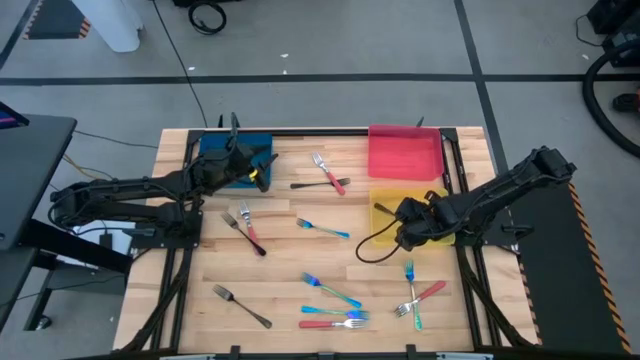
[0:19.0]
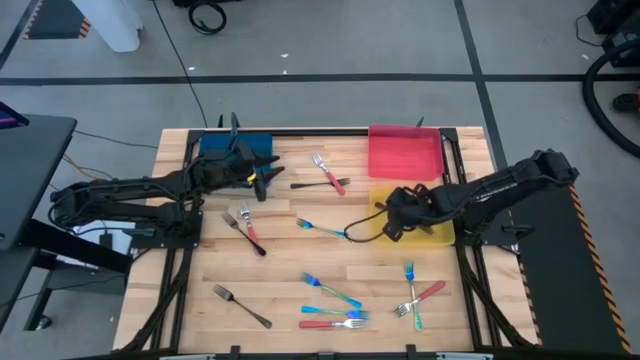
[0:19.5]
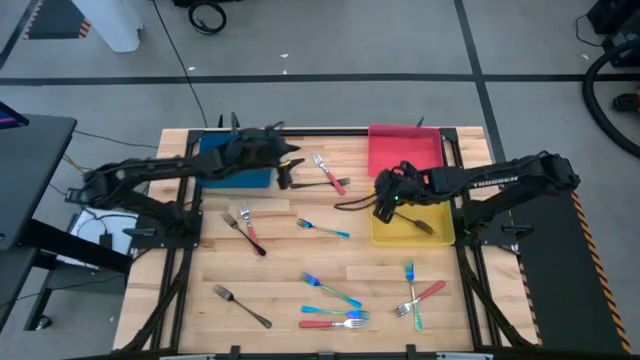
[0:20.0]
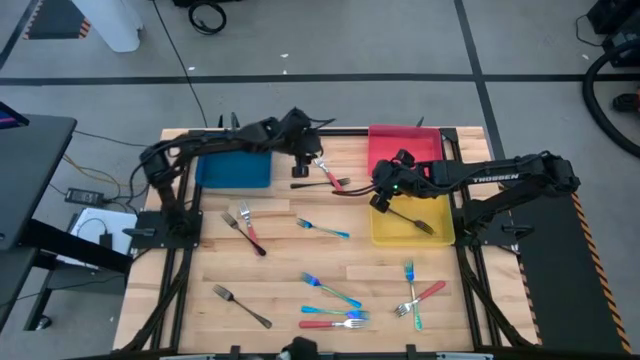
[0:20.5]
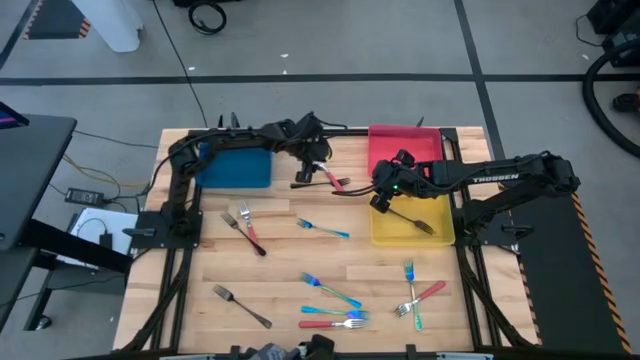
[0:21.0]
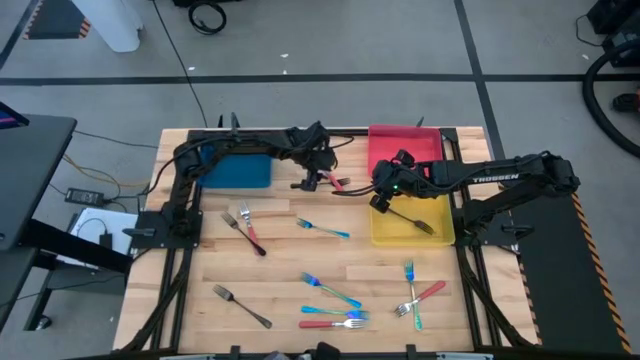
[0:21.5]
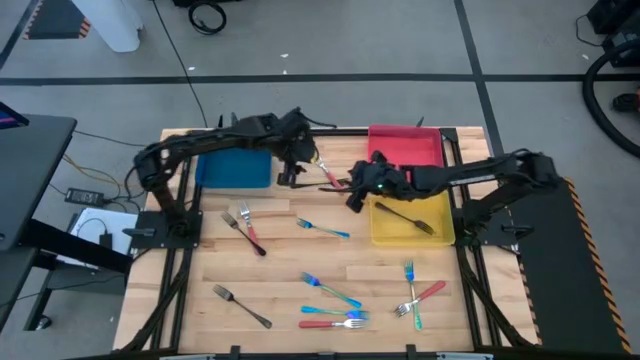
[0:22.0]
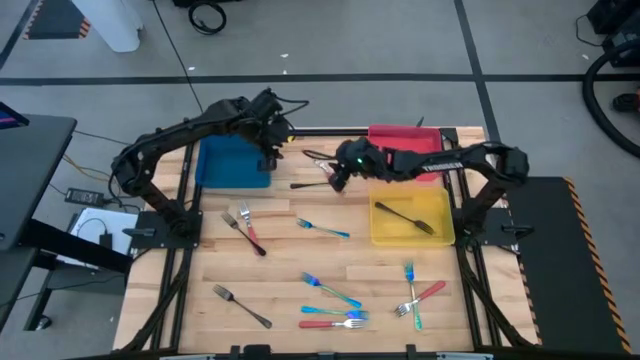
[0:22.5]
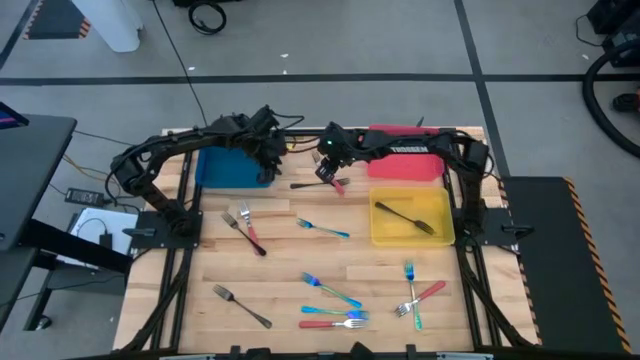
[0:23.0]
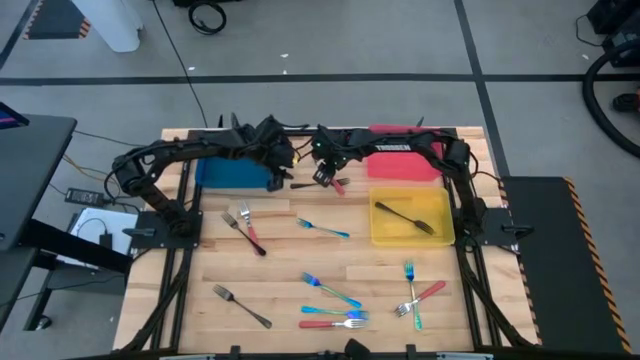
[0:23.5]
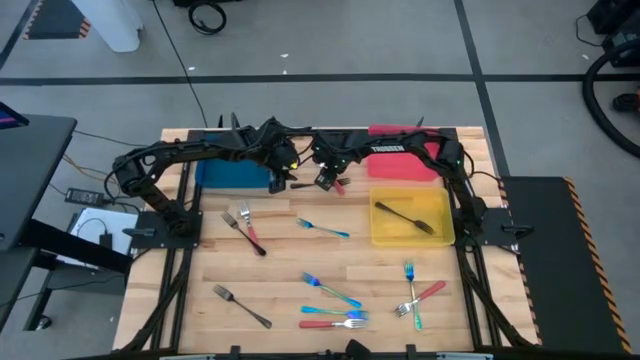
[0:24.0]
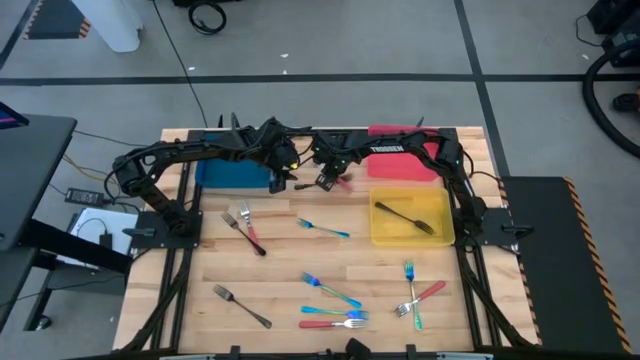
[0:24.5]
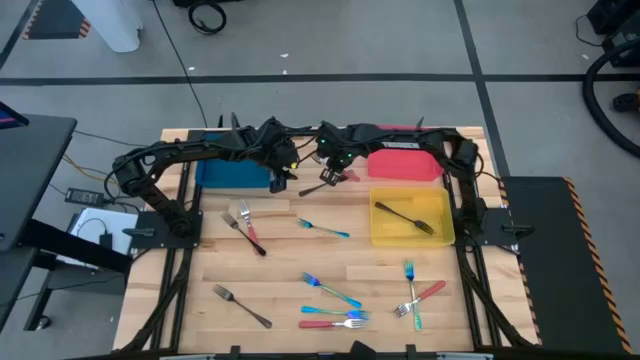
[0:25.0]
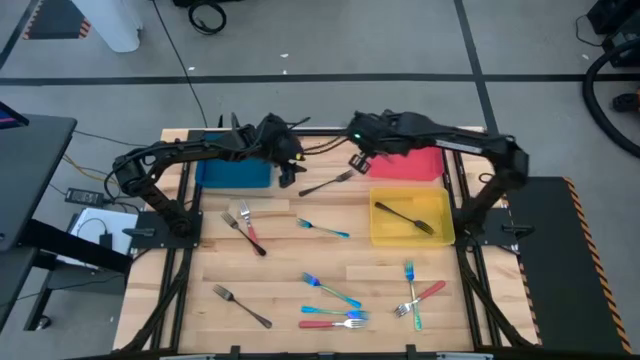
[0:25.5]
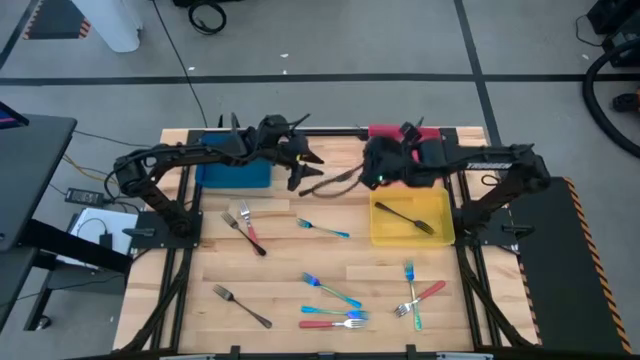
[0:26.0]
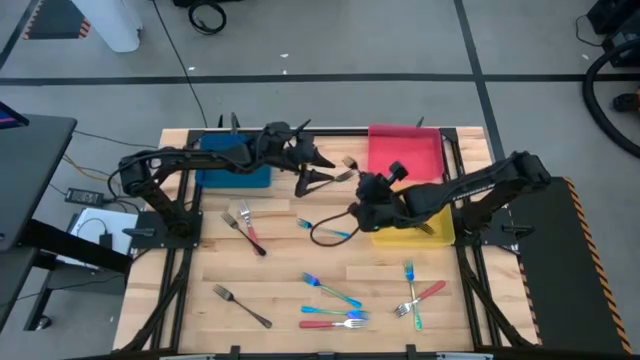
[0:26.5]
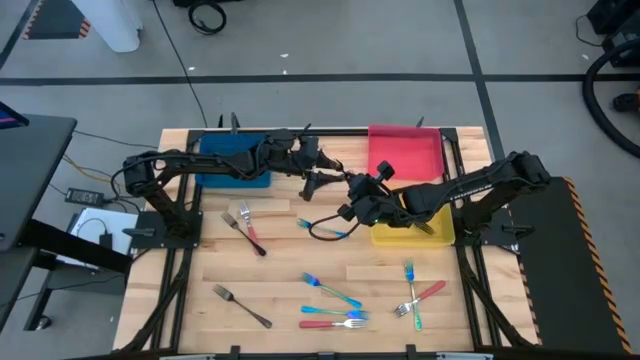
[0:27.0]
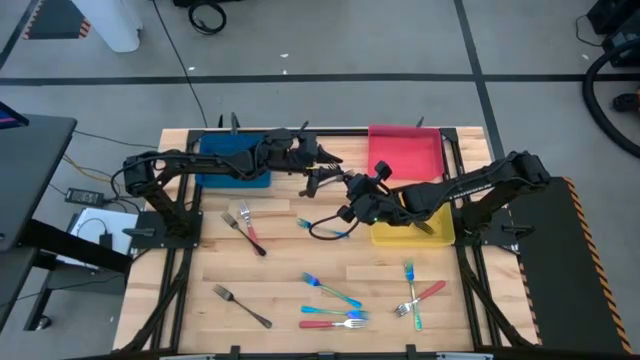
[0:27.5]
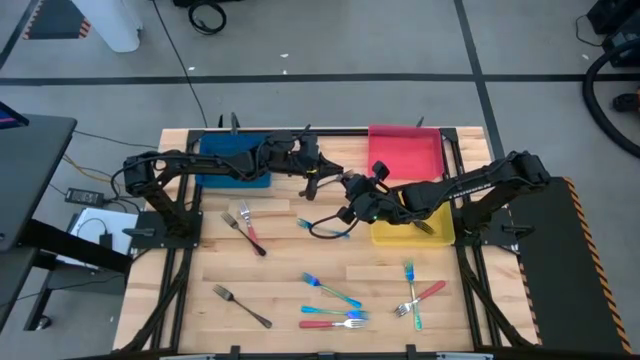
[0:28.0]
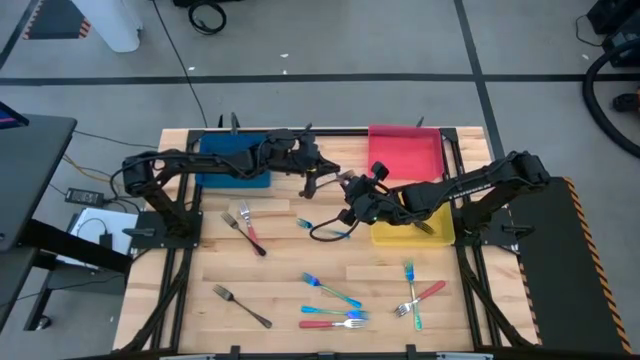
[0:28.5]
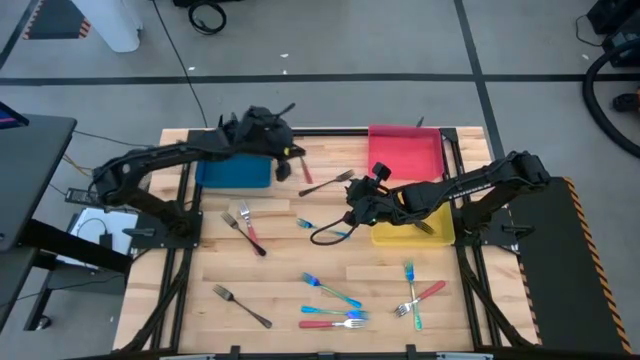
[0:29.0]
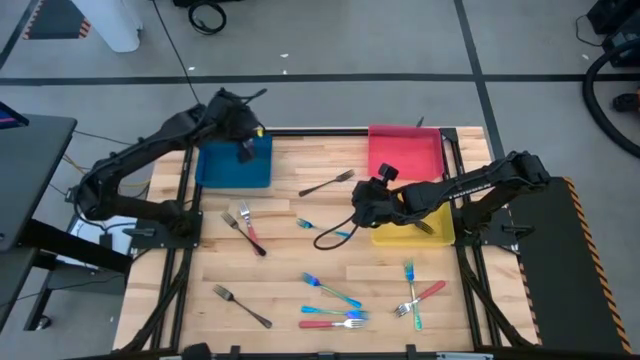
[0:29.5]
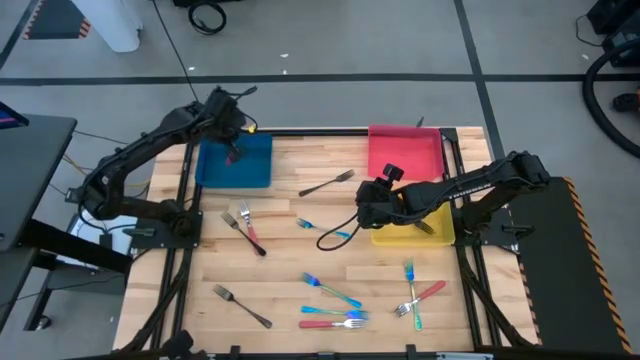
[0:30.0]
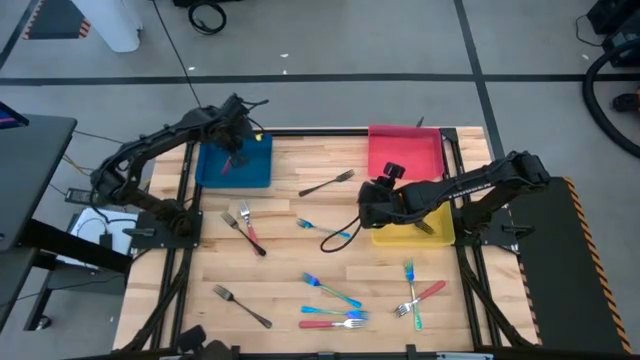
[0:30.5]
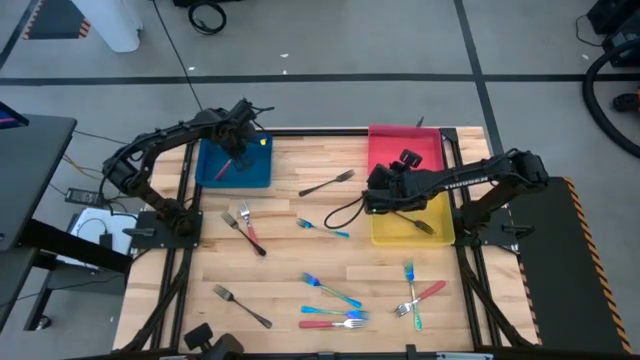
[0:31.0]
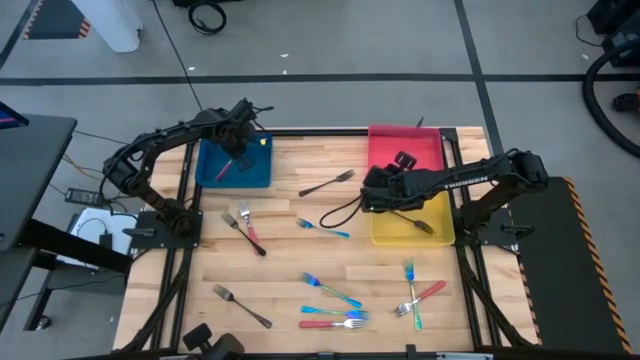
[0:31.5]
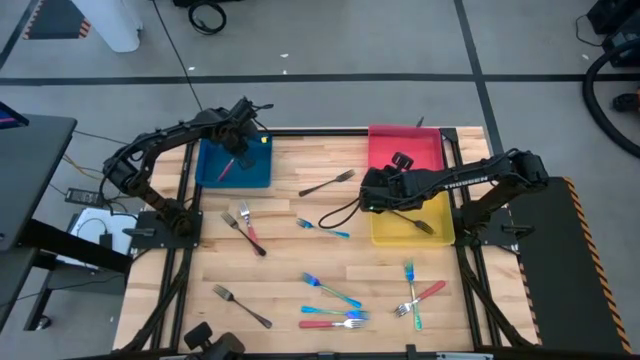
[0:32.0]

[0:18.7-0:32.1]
Task: Sort silverware by color (type)
Put the red fork into the blue bin

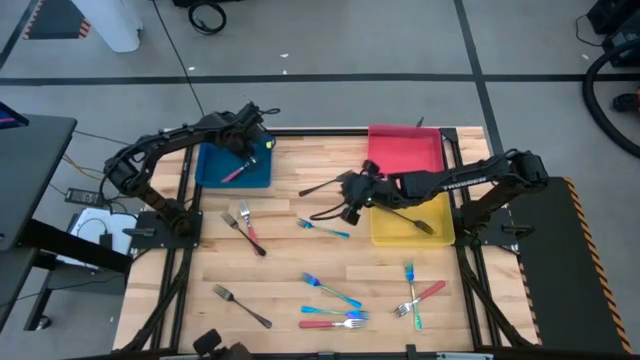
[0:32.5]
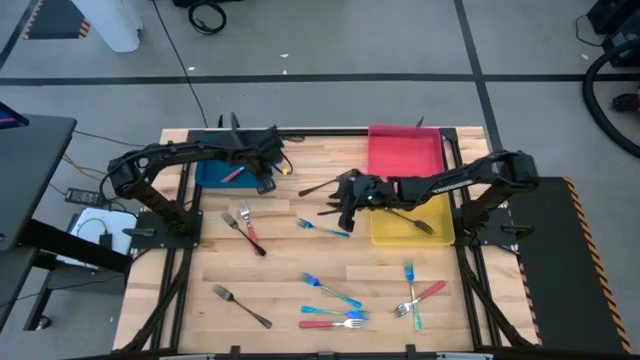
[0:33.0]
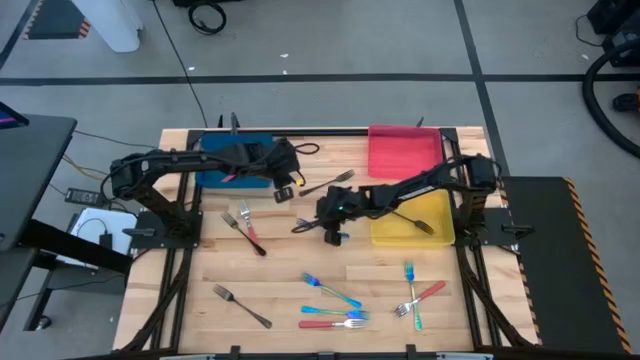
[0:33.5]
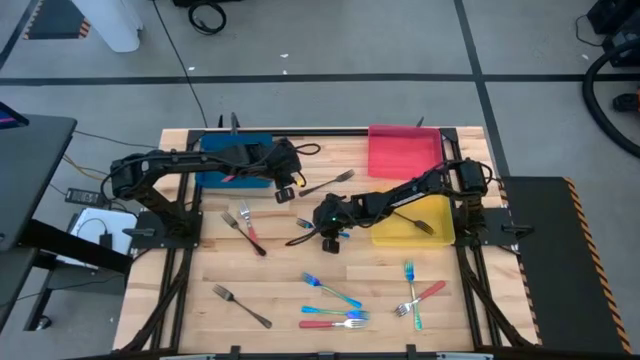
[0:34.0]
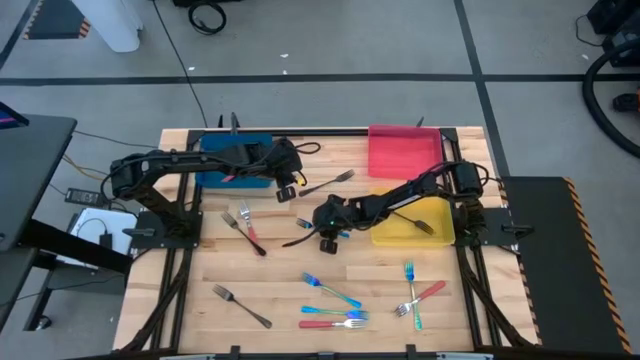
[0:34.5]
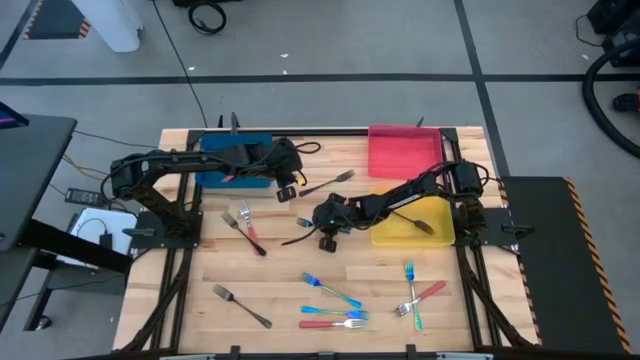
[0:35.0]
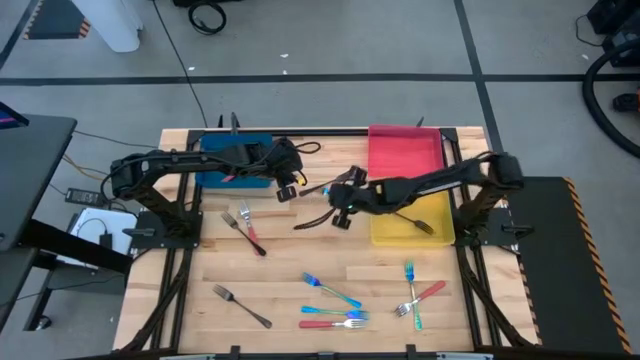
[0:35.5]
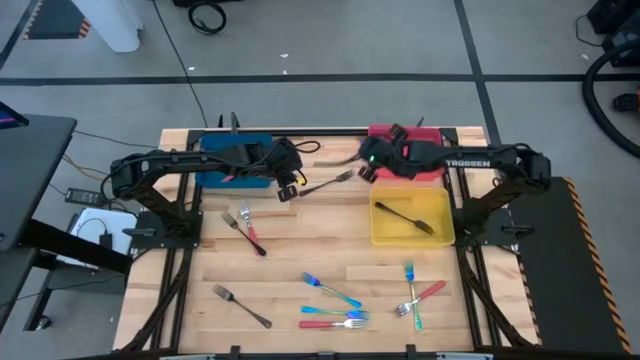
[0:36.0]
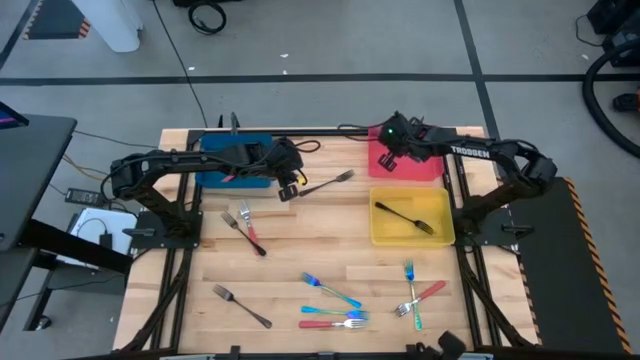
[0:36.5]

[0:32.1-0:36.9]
Put the blue fork into the red bin

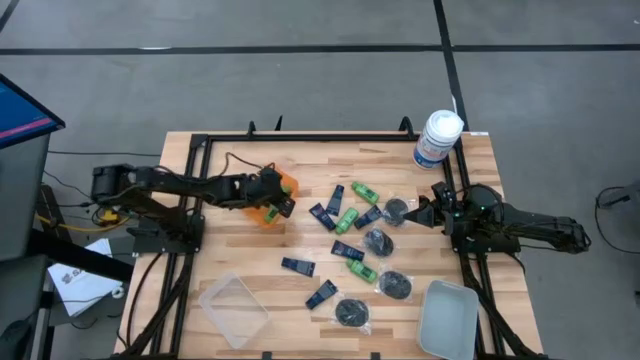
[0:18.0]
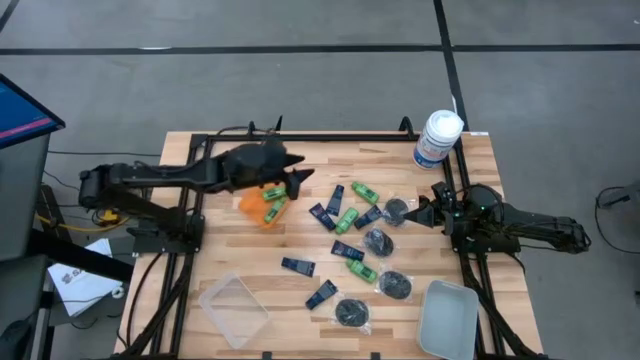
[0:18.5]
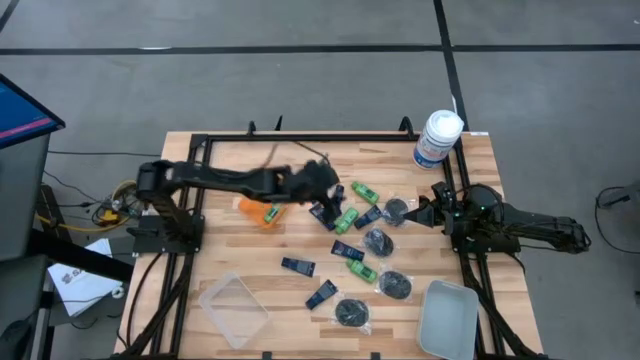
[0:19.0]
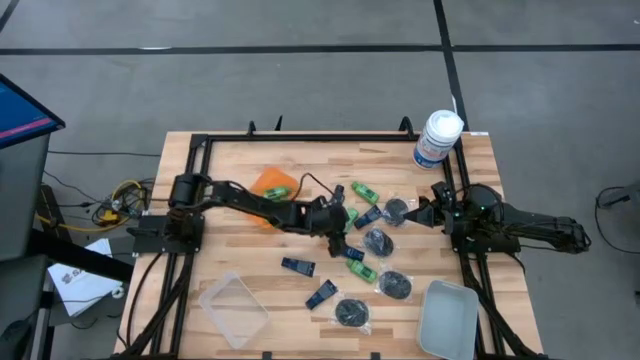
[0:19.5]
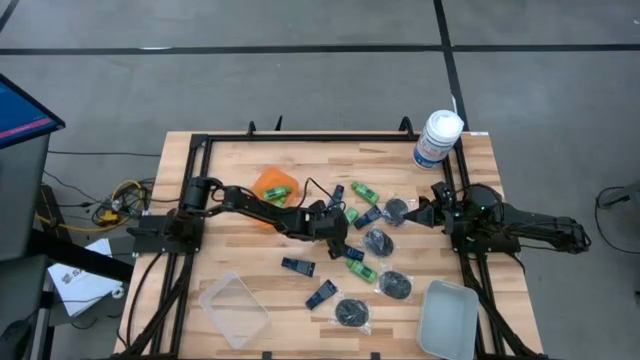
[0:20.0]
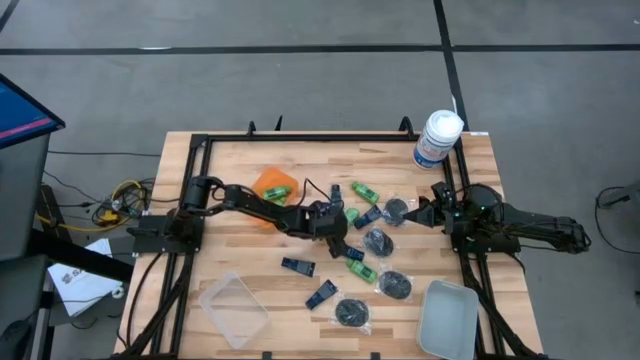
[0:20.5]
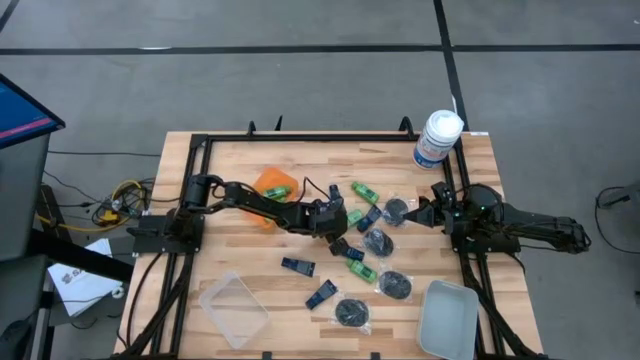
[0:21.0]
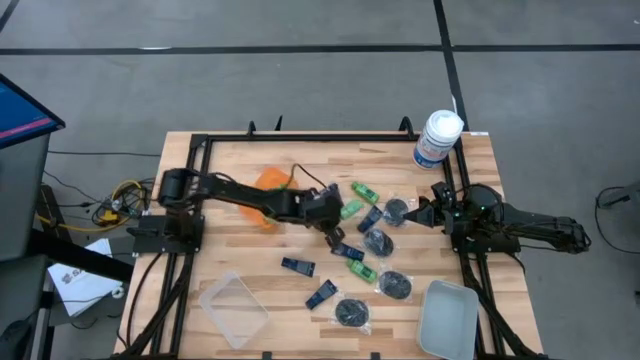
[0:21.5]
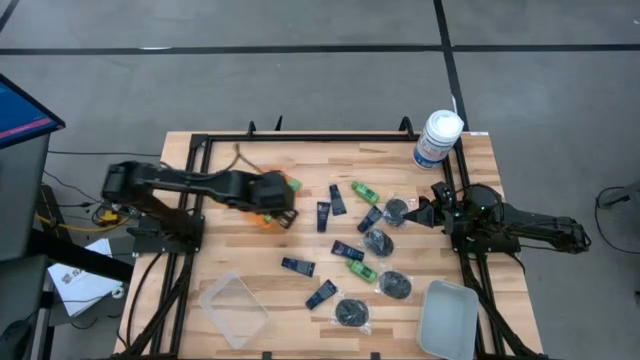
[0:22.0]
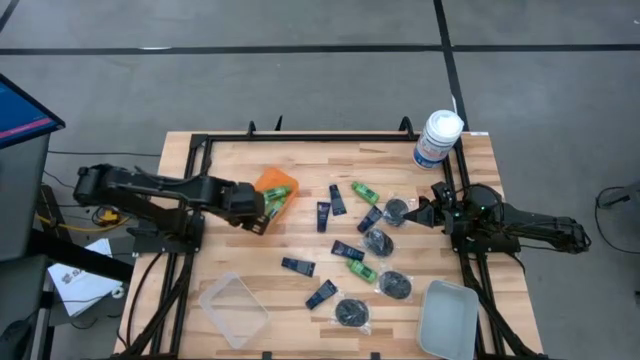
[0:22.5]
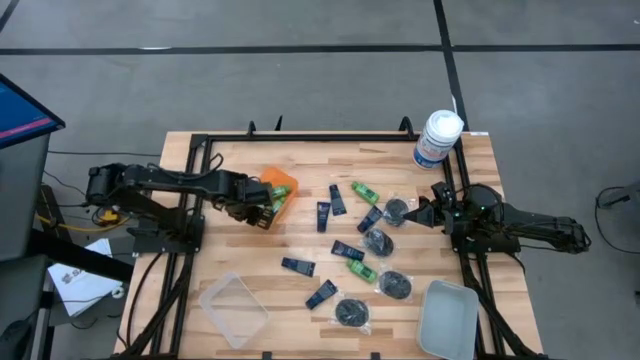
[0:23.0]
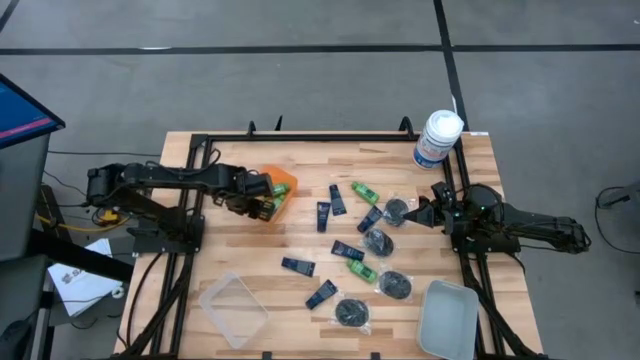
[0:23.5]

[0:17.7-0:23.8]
Task: Pick & Place Travel size toiletries
Put the green shampoo bottle into the top orange bin
